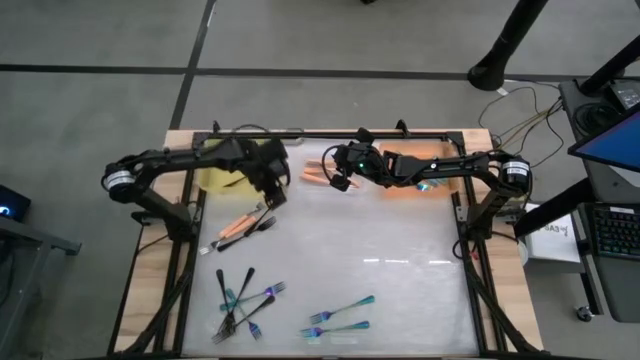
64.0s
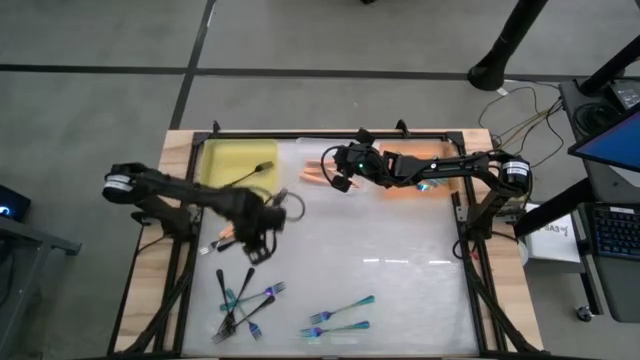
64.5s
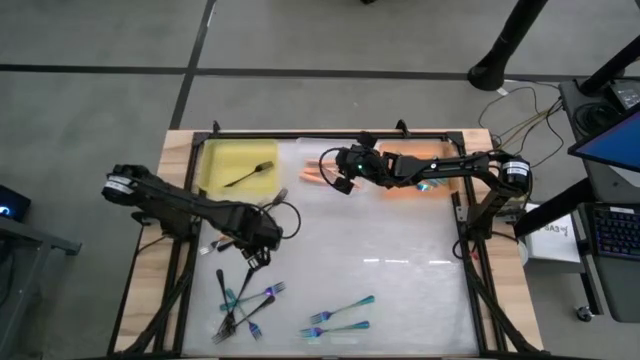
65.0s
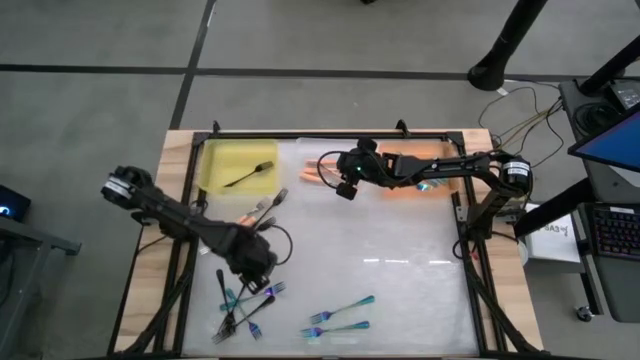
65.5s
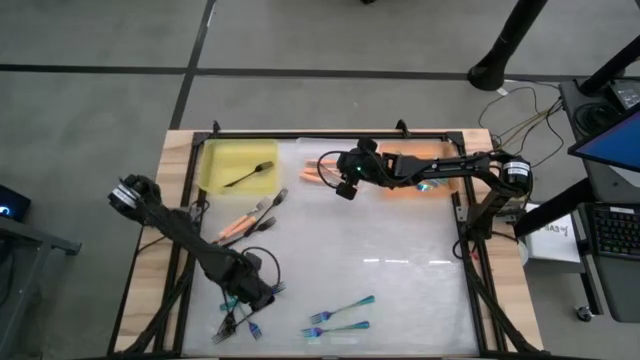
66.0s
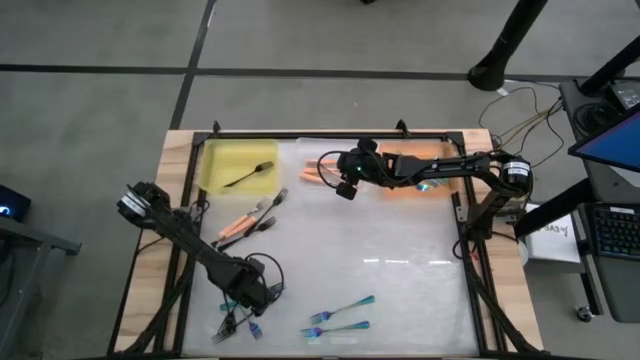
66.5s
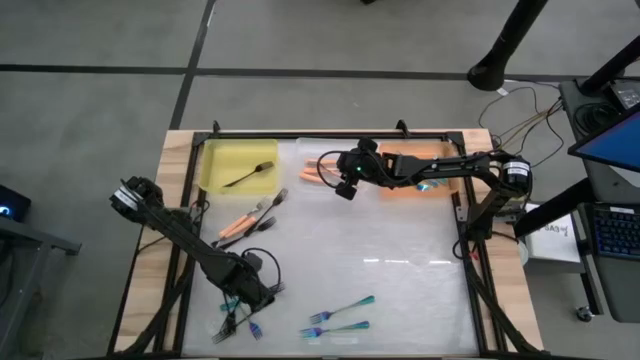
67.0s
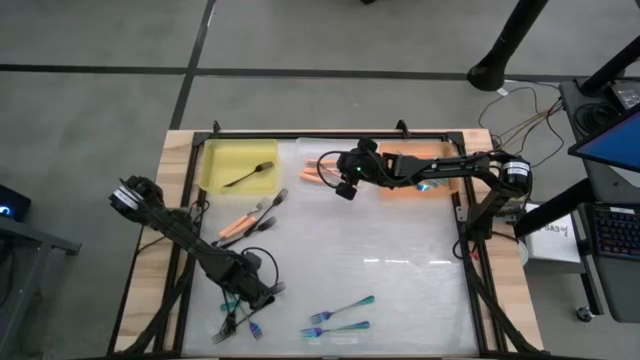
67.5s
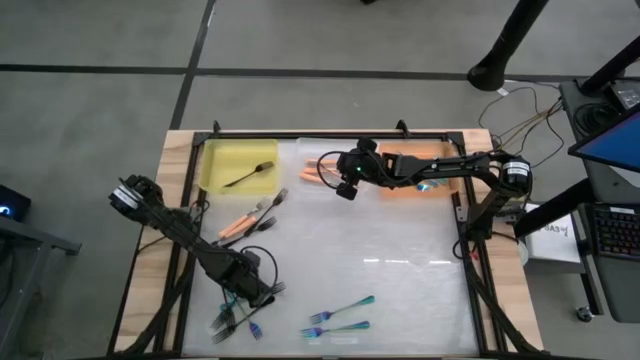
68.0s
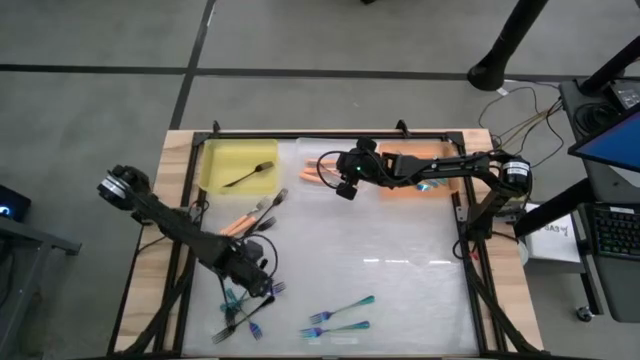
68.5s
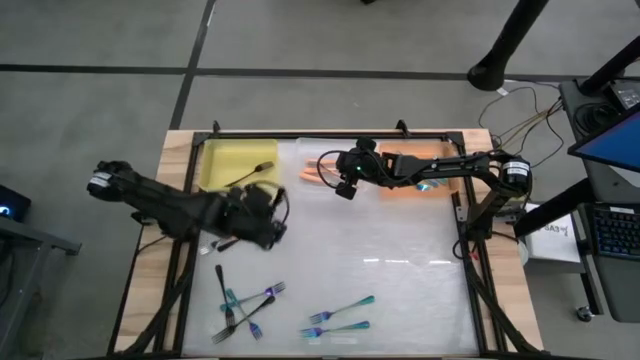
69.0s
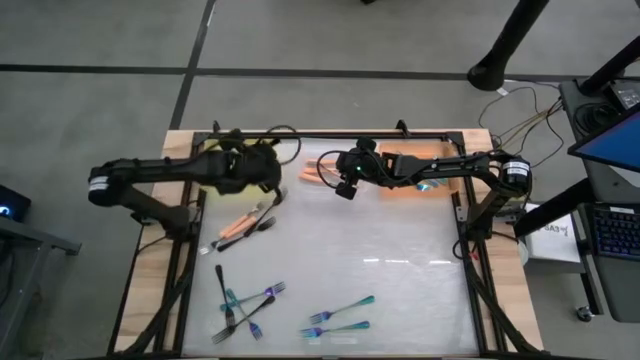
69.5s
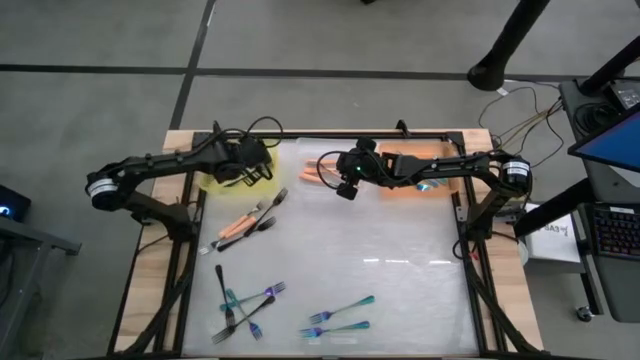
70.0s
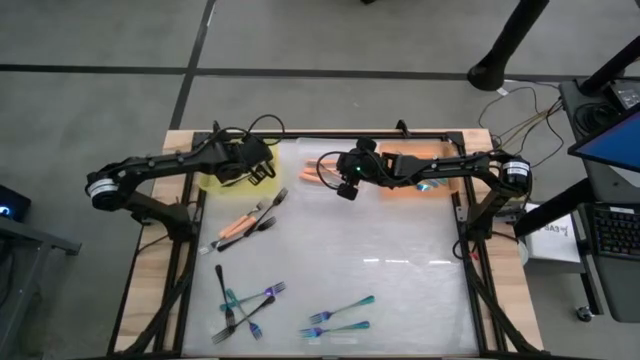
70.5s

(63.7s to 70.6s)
Task: Sort silverware by color (type)
Put the black fork into the yellow bin

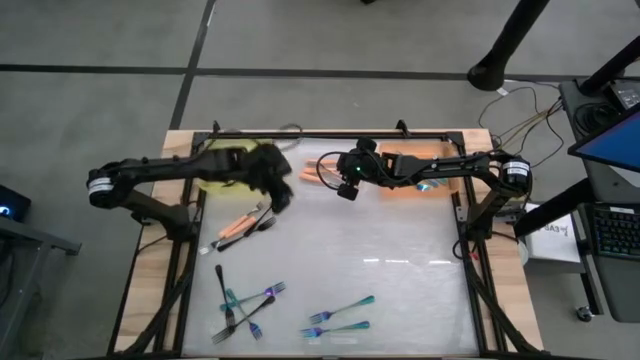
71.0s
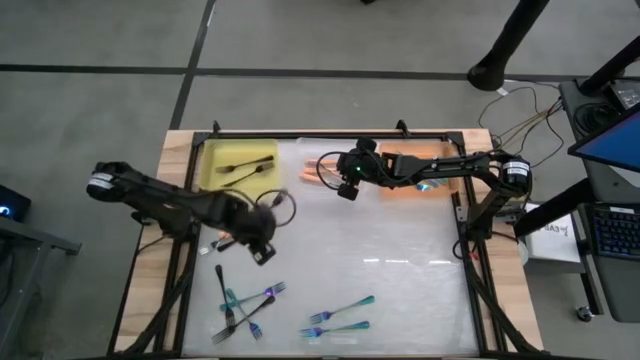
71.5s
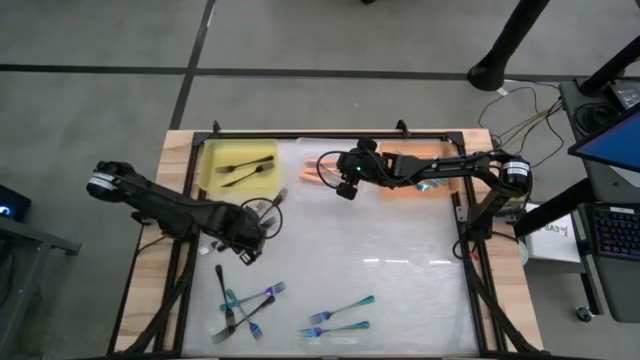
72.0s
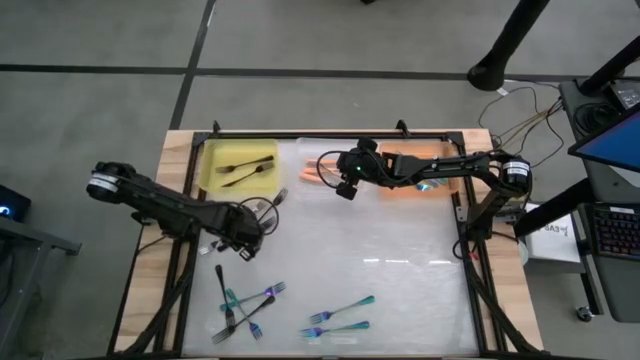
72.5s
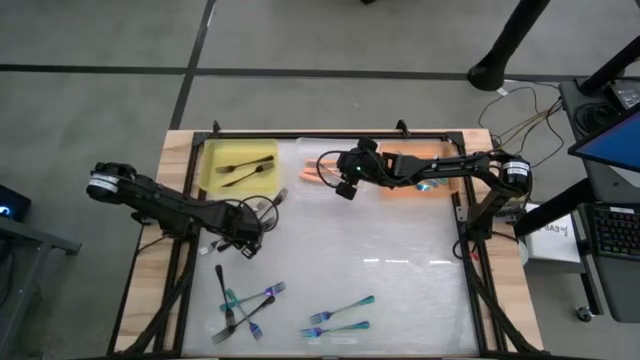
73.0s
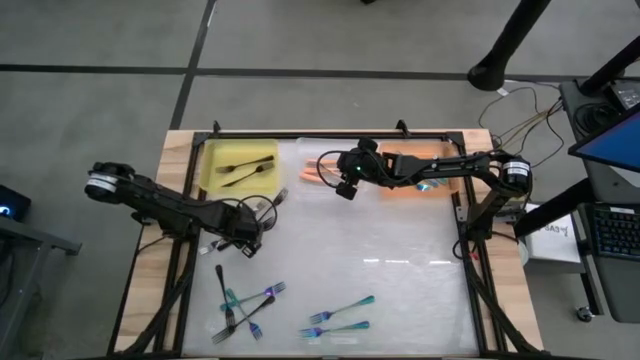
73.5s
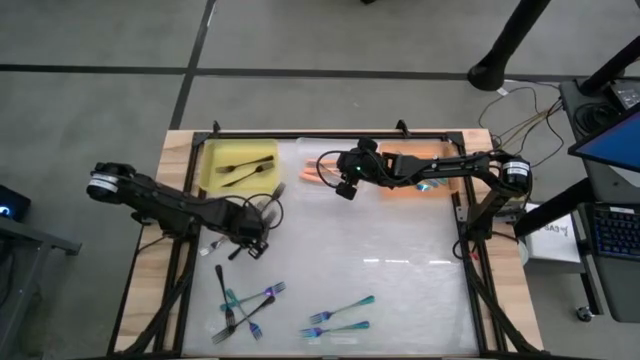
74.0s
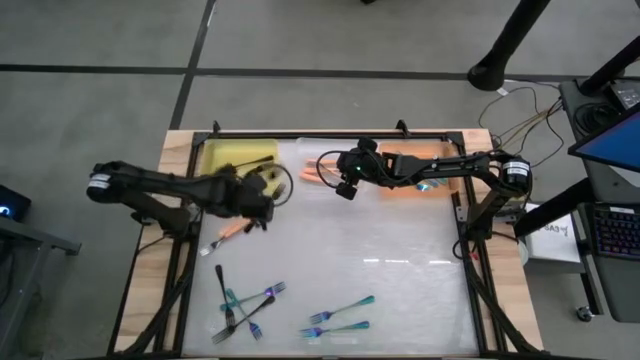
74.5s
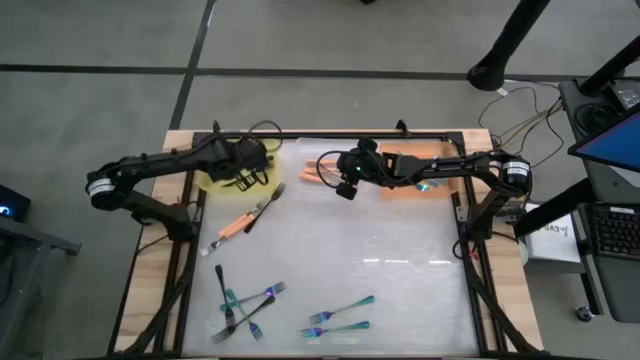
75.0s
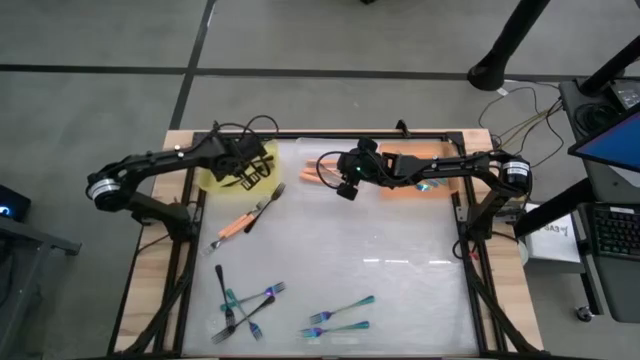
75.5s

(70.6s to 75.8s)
Put the black fork into the yellow bin

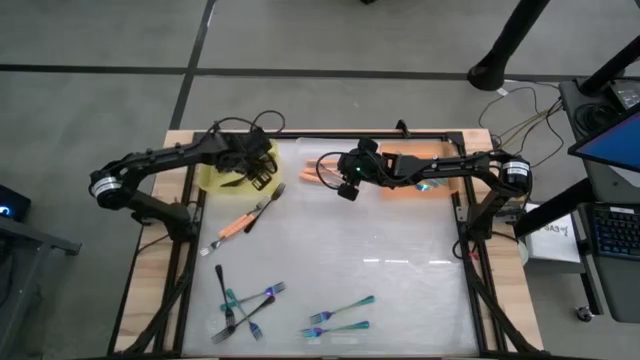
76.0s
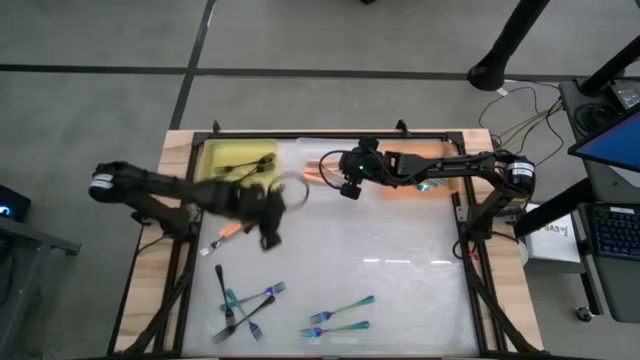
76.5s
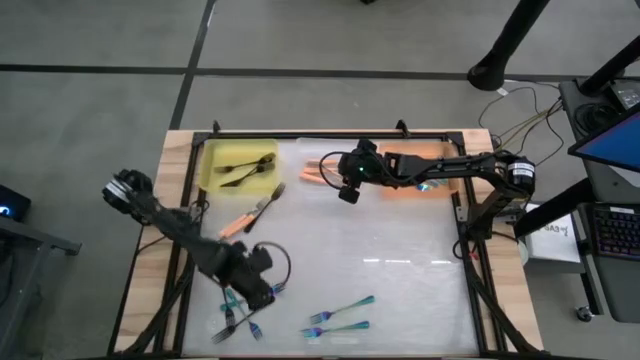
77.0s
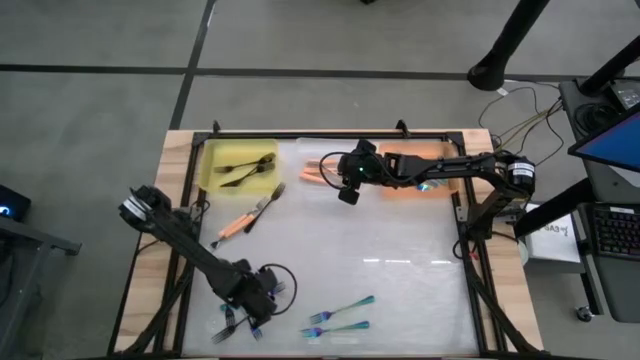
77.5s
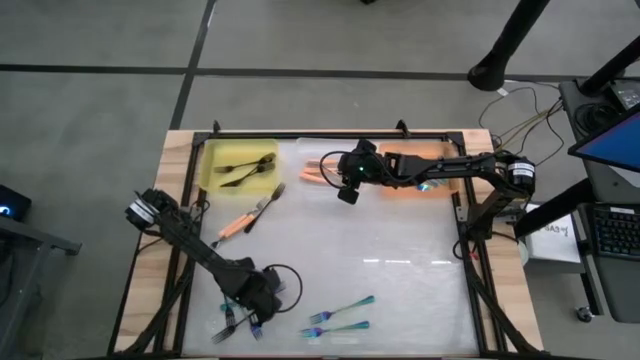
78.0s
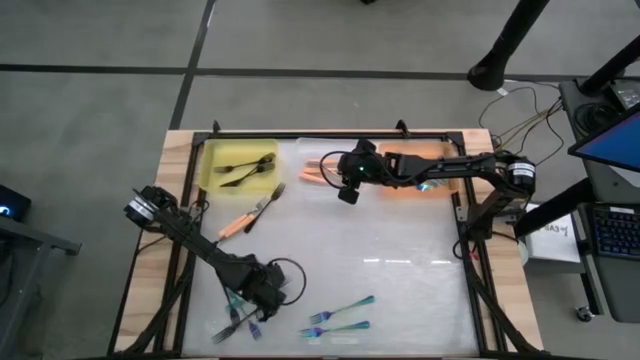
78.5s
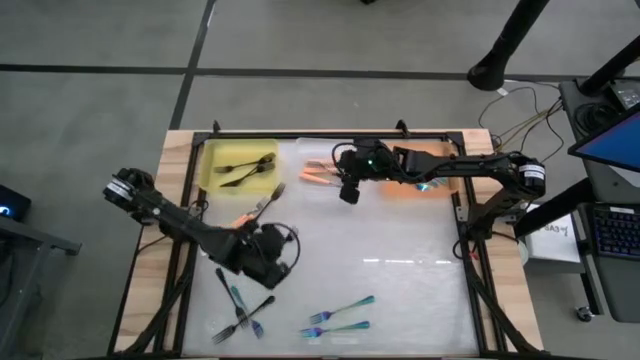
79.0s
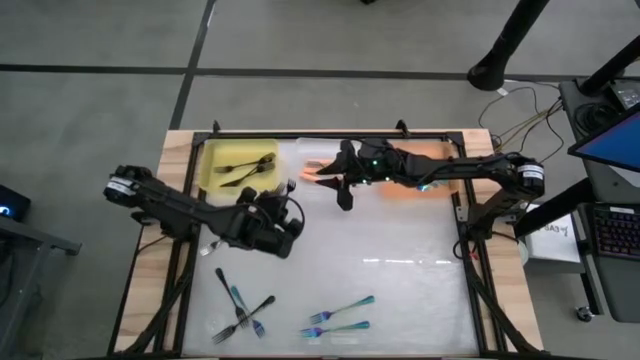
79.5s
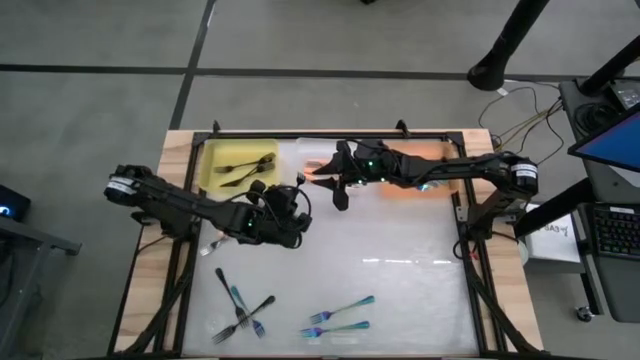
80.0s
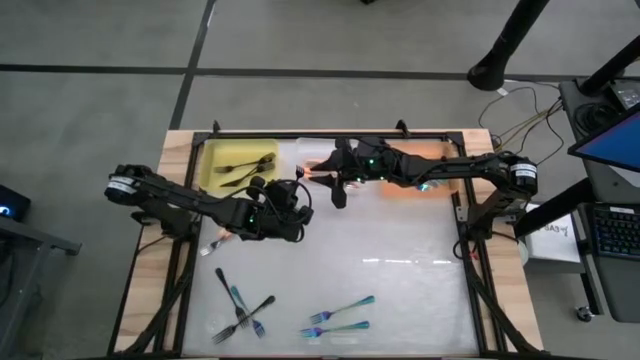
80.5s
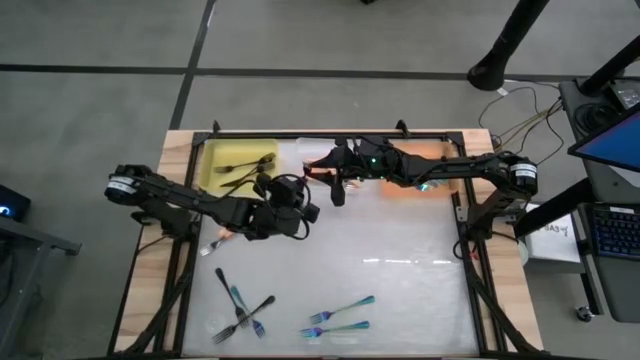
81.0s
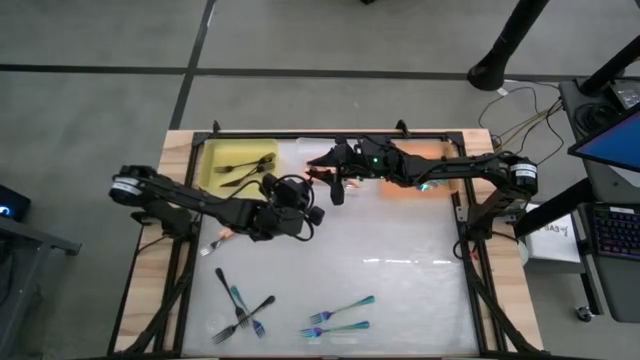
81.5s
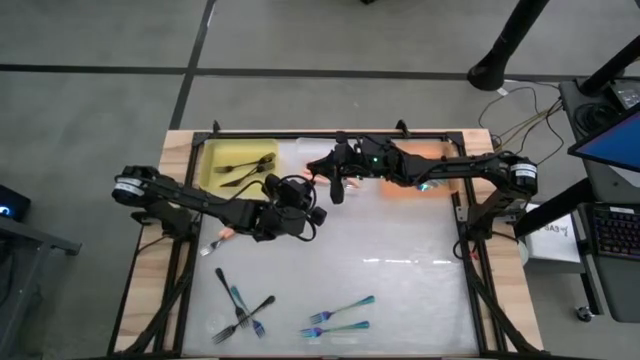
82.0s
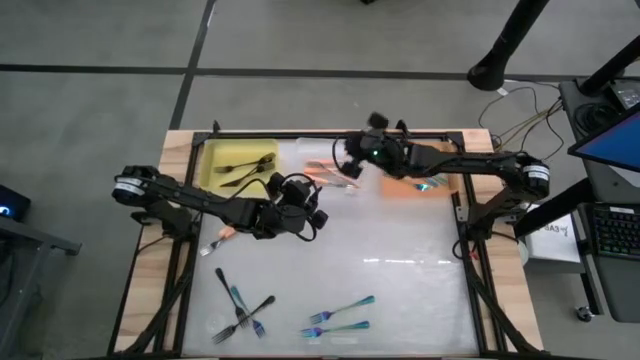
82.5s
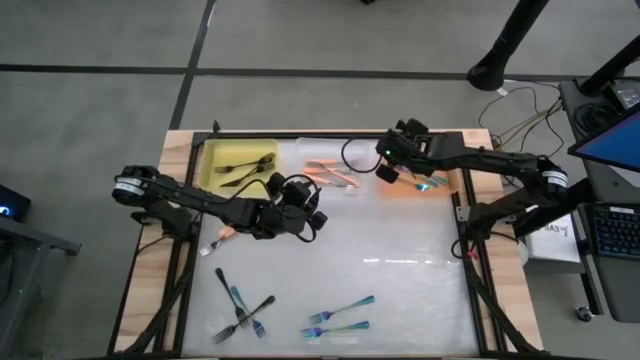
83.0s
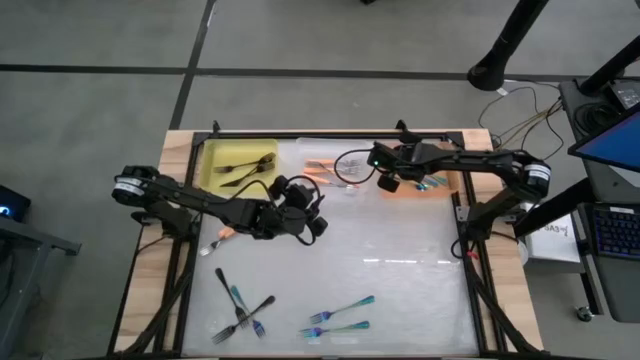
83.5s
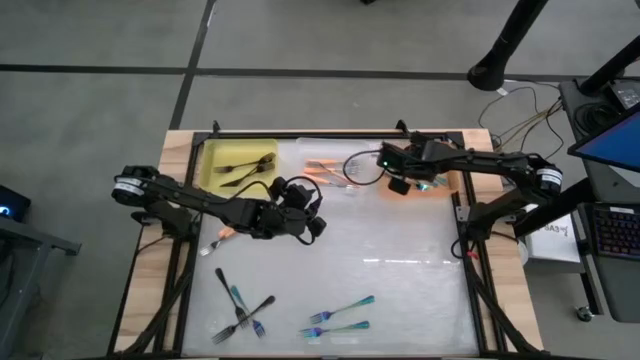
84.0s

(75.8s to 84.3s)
Put the iridescent fork into the orange bin

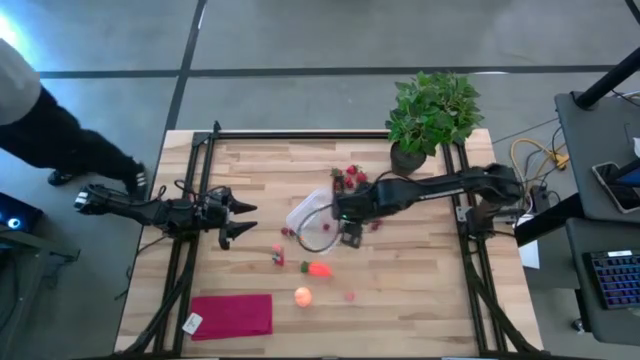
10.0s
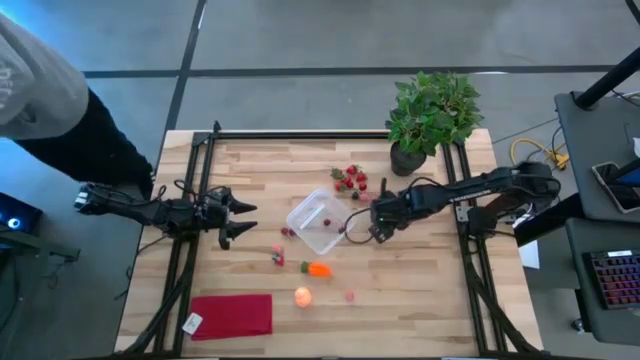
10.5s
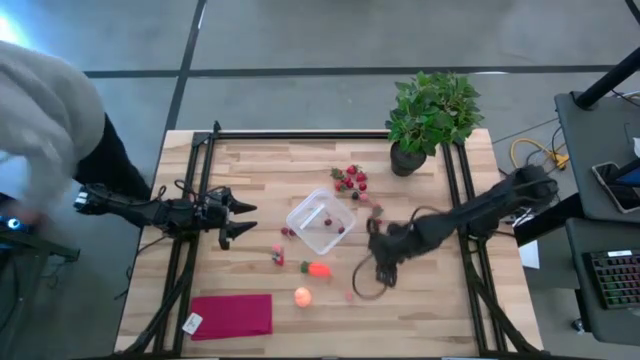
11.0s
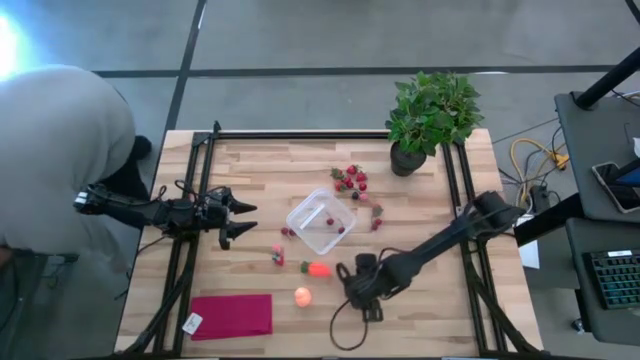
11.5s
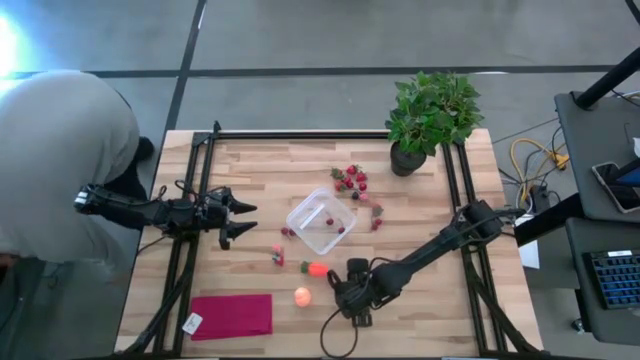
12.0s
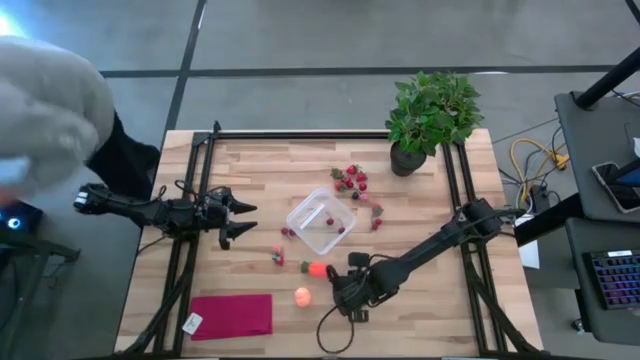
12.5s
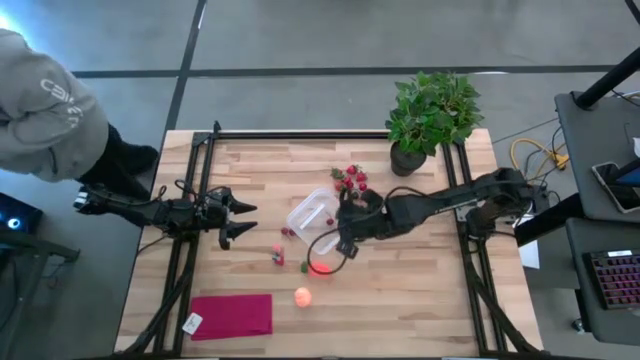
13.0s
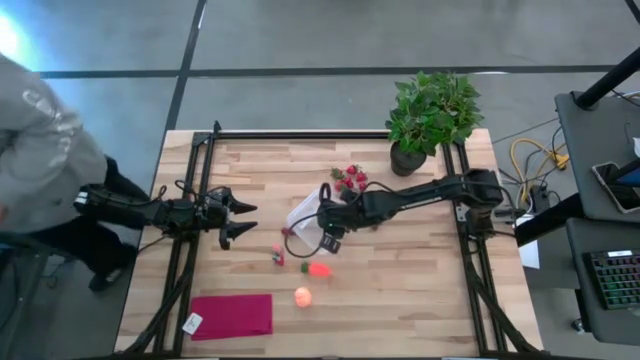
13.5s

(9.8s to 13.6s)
Task: Pick and placing Produce into tupperware
Put the pink peach into the transparent container
